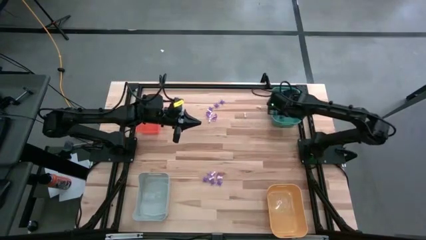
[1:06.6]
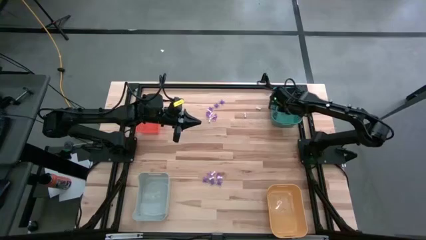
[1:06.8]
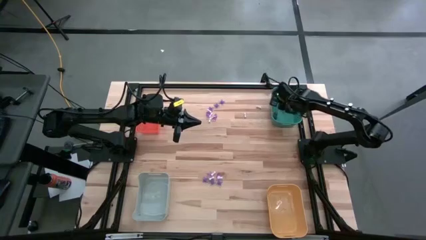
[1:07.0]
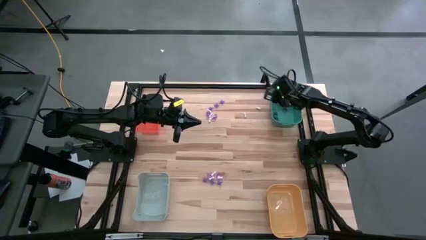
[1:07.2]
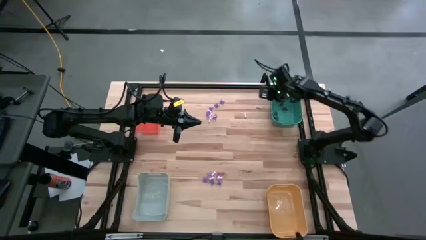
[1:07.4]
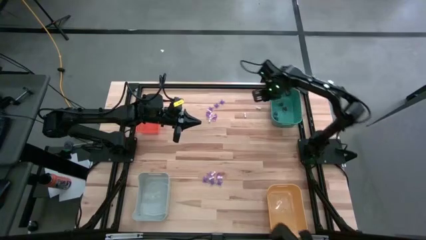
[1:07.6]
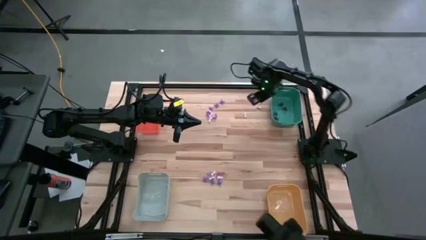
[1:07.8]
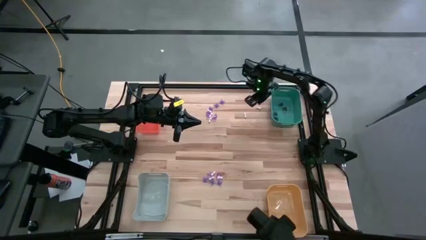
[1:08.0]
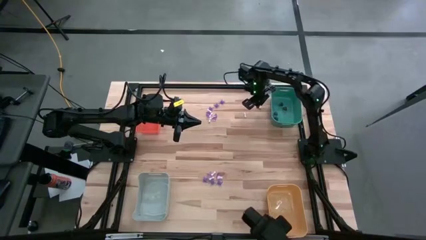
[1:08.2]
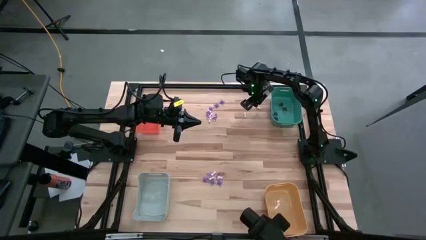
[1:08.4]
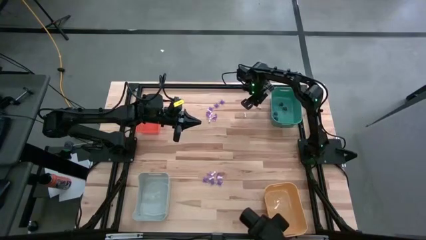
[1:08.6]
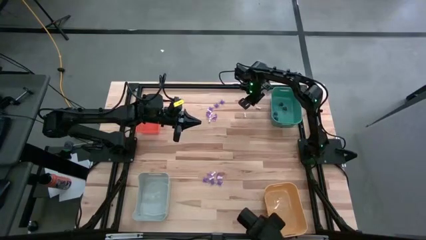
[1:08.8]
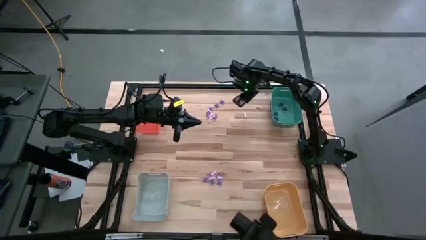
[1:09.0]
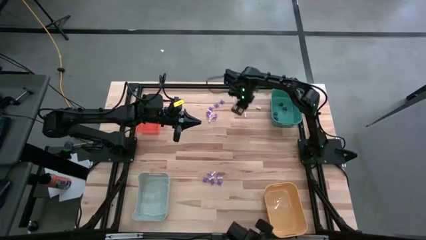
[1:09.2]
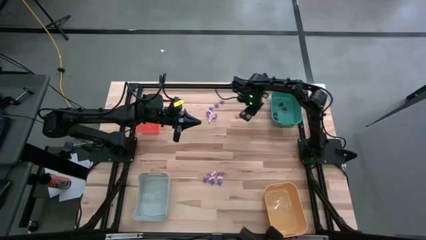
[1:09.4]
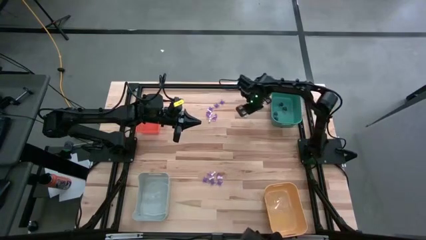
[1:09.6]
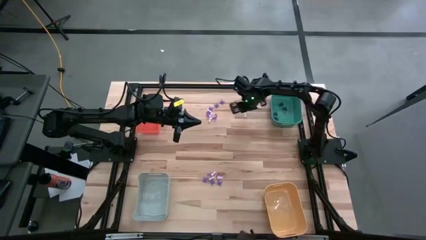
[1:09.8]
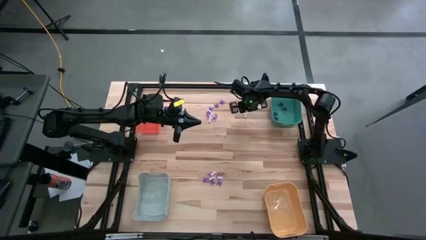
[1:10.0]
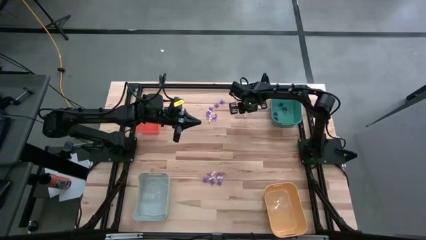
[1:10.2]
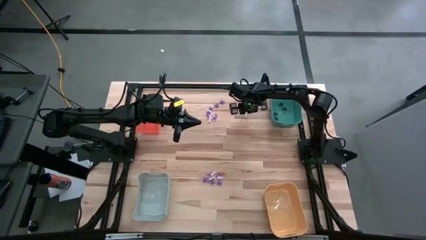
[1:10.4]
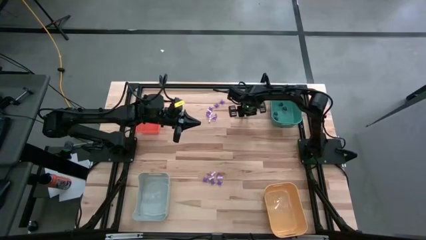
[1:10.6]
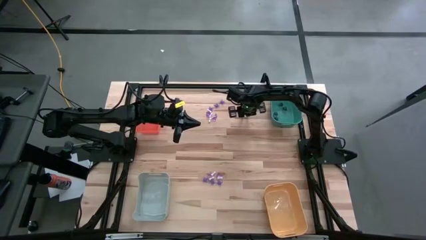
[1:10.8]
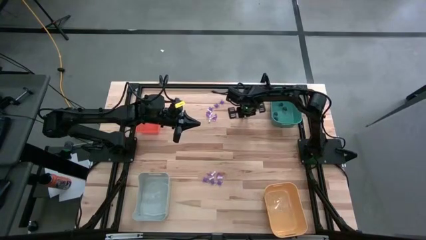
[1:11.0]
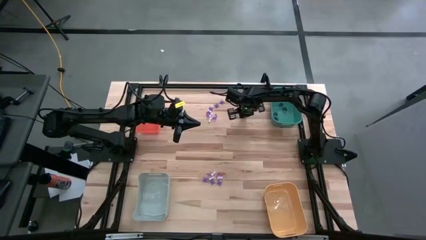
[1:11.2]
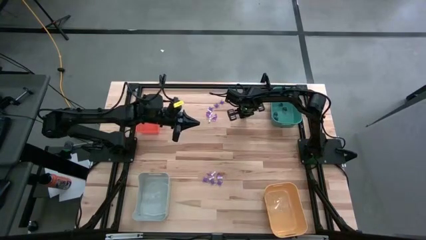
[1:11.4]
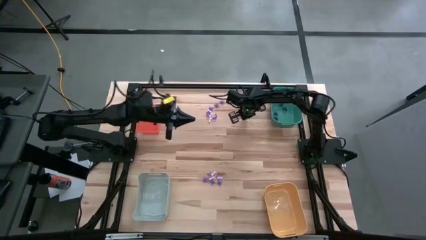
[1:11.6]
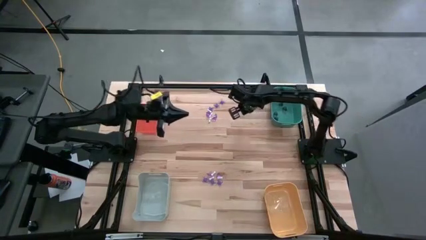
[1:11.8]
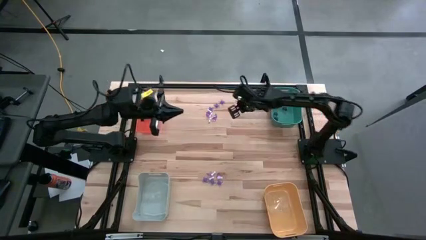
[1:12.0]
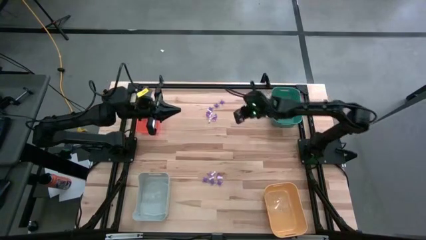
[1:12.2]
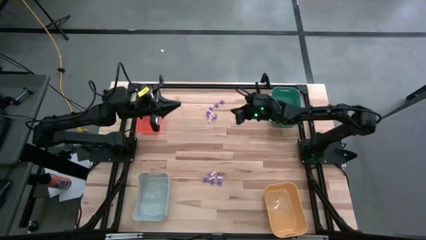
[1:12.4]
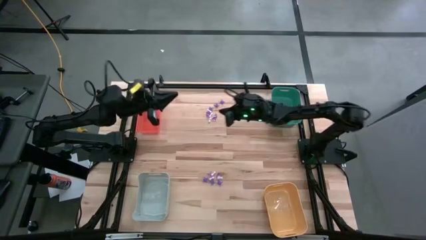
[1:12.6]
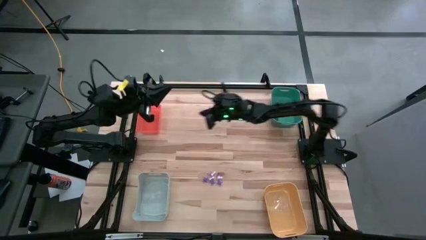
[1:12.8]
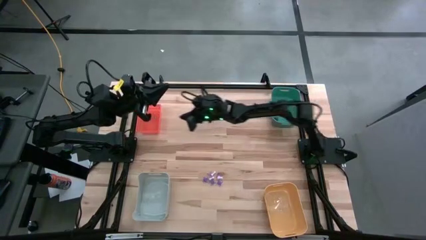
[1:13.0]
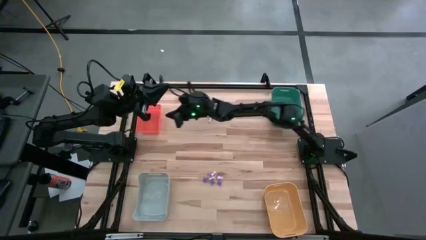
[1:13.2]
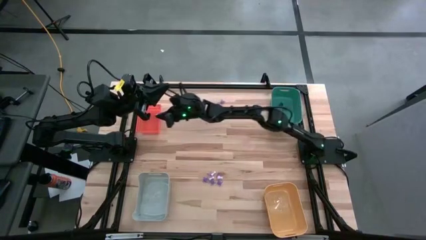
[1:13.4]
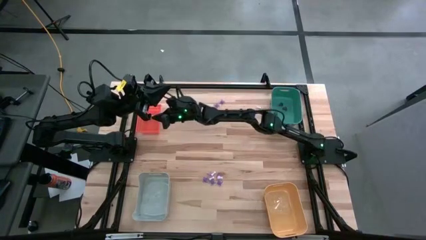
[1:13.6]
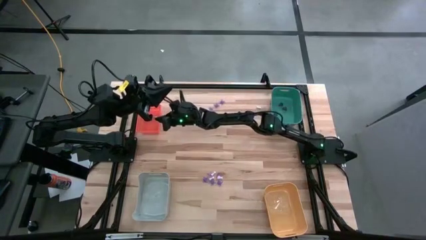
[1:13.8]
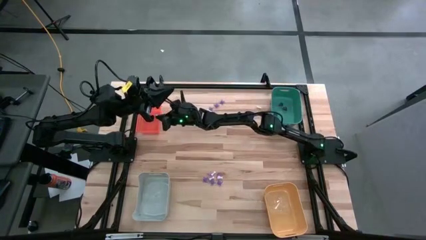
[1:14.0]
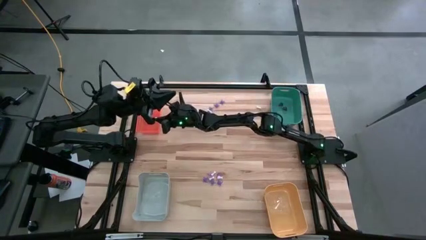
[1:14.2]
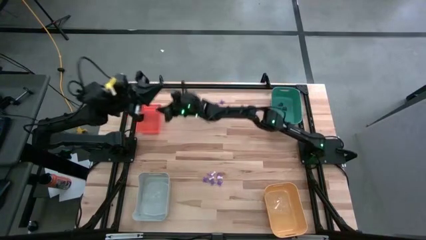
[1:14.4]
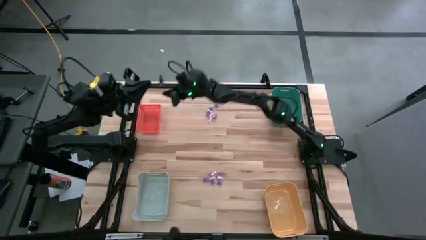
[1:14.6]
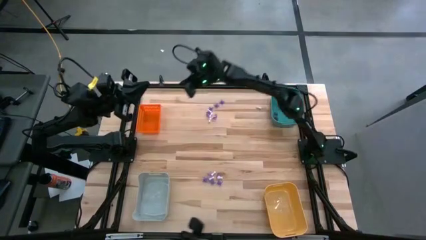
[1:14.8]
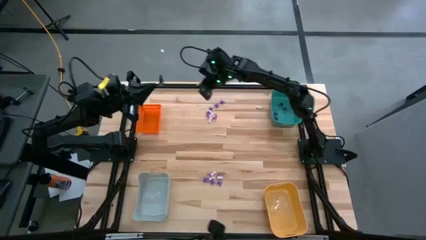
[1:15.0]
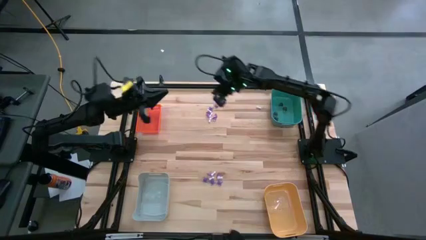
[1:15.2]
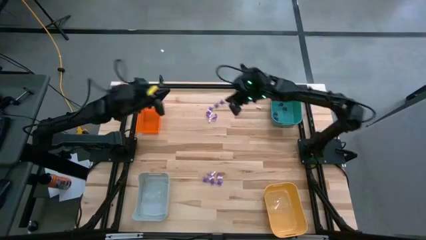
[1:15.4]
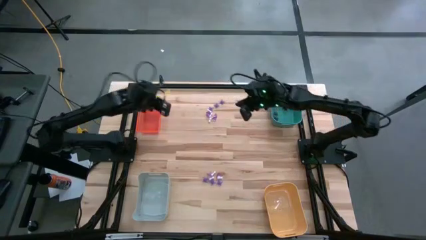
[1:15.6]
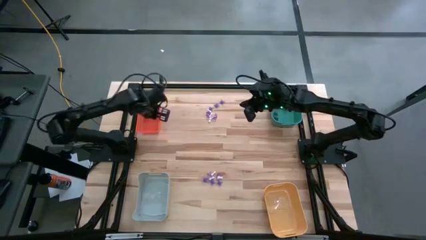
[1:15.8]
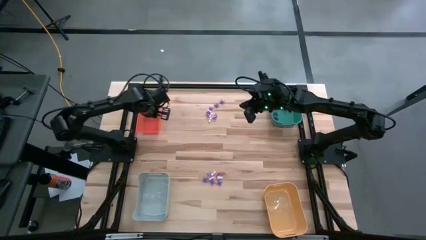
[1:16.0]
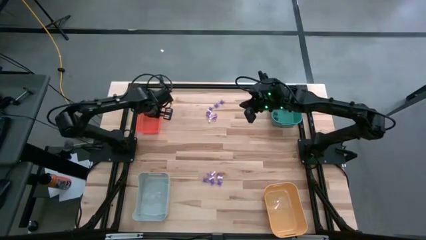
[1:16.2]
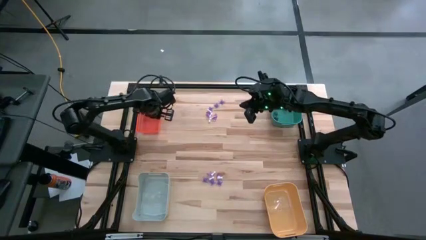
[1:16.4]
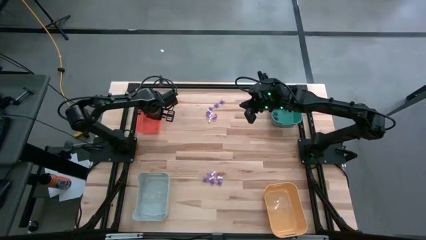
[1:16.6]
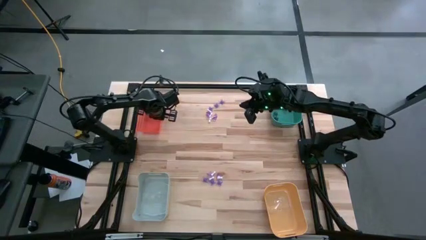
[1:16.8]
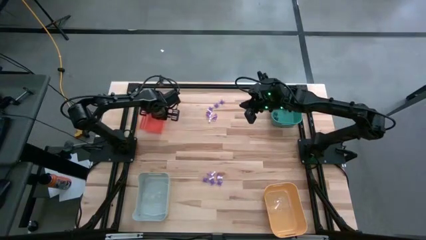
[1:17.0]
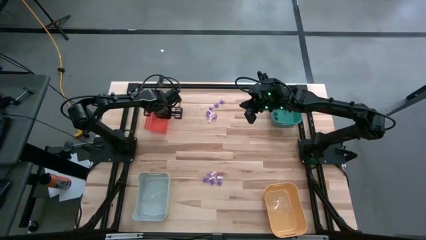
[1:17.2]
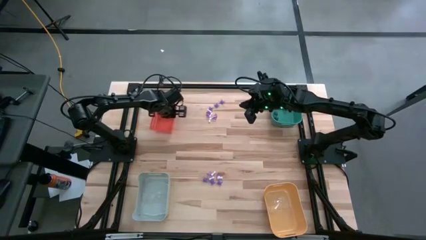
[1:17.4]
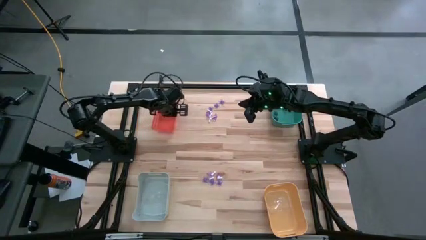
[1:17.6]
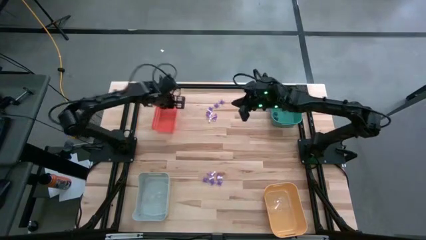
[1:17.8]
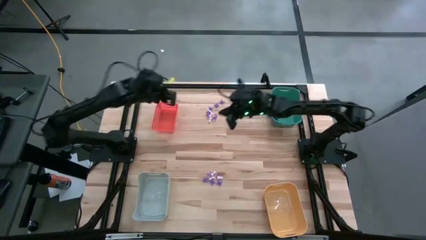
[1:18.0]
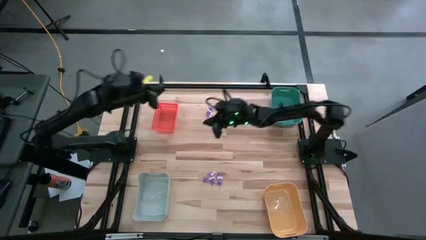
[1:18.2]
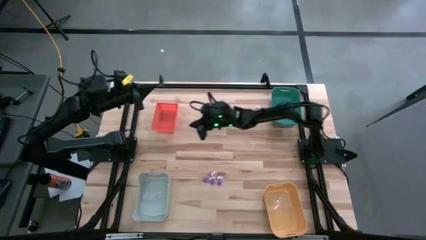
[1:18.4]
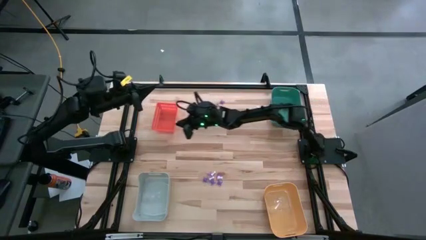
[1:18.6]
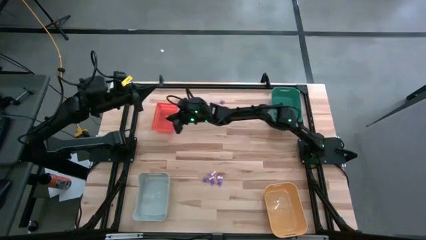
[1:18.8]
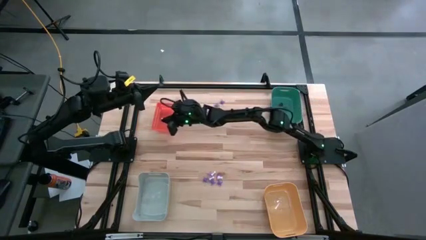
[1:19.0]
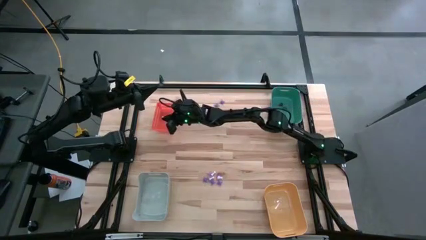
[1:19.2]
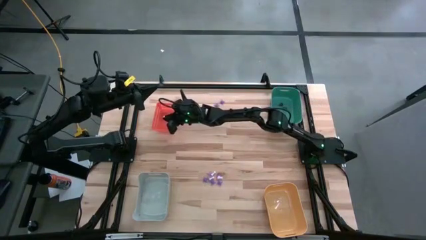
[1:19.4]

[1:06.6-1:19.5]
Task: Sort Halloween decoration
Put the white bone toy into the orange bin
